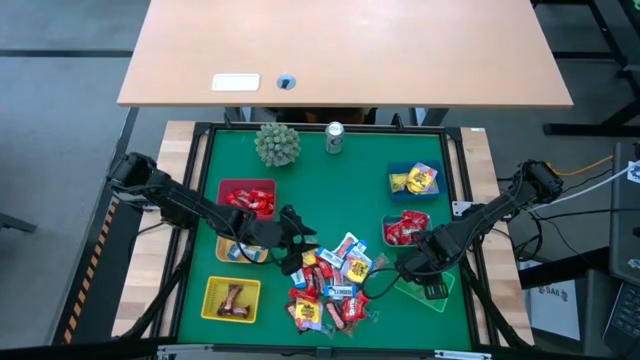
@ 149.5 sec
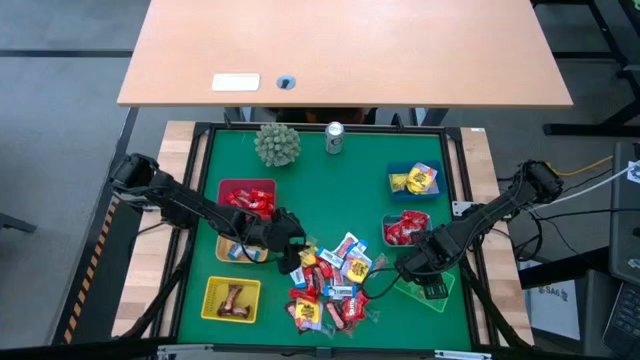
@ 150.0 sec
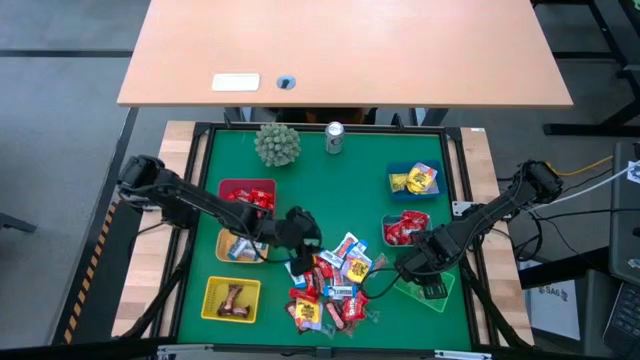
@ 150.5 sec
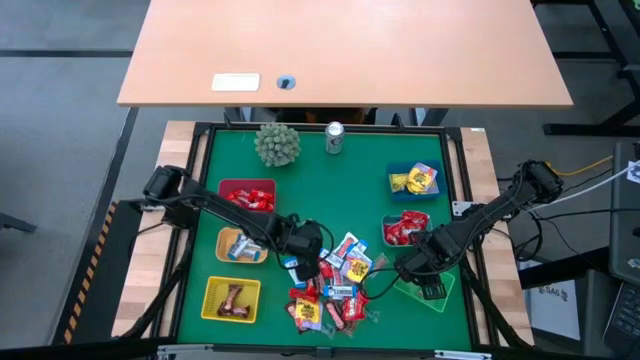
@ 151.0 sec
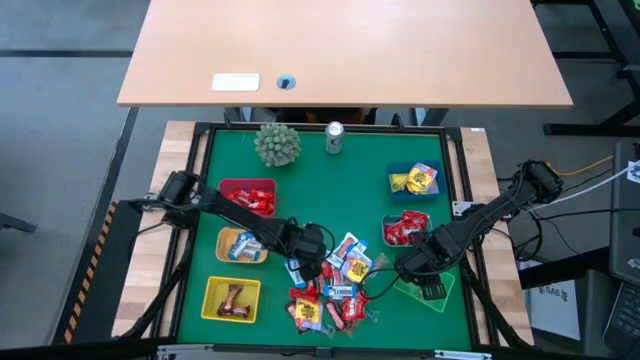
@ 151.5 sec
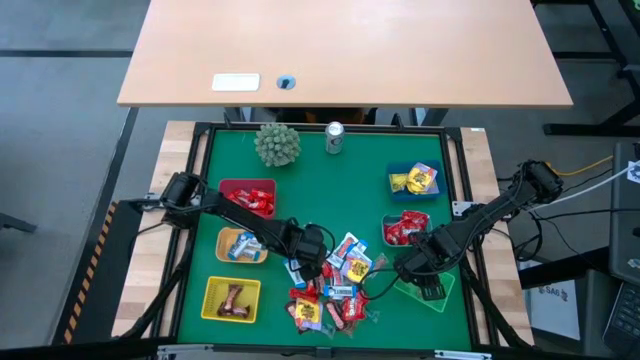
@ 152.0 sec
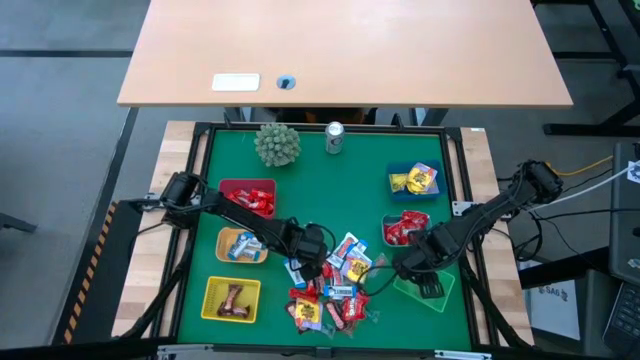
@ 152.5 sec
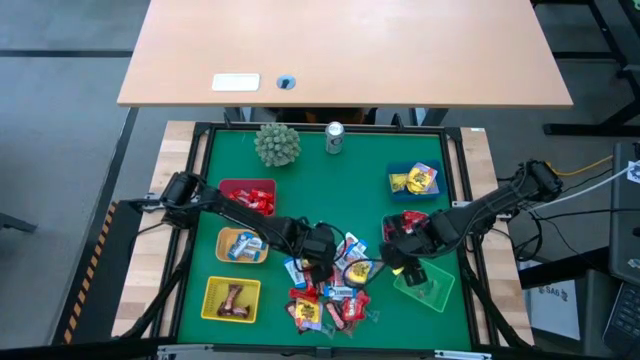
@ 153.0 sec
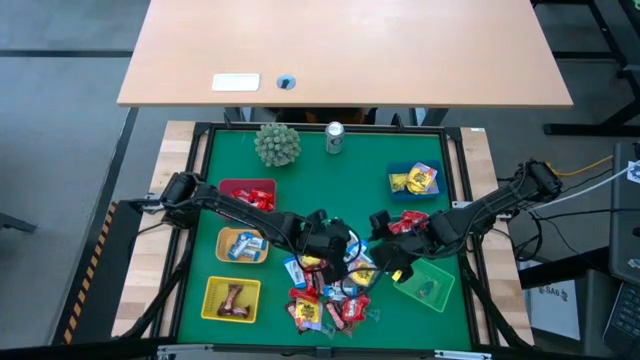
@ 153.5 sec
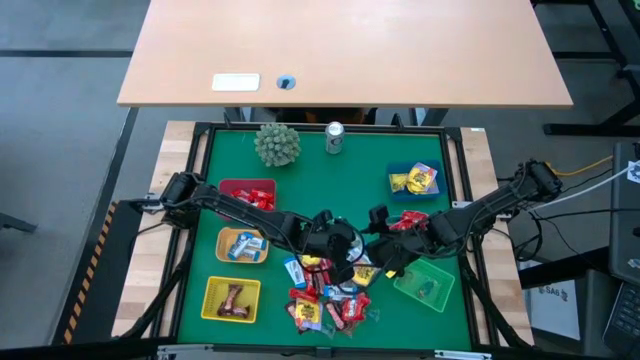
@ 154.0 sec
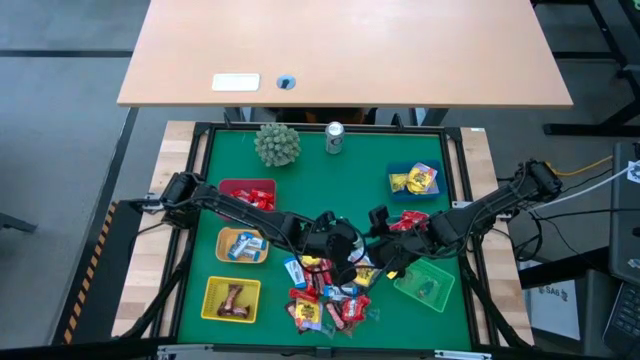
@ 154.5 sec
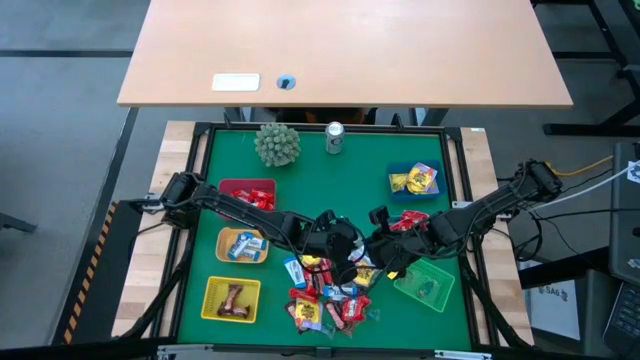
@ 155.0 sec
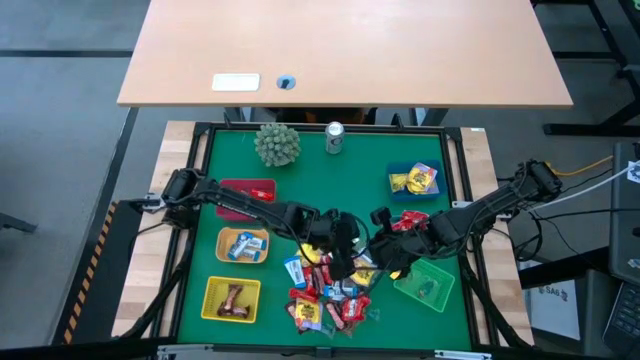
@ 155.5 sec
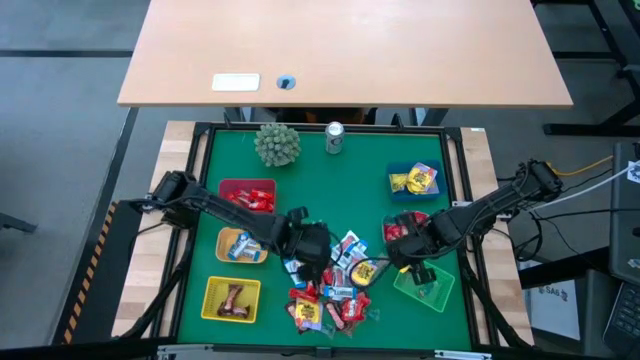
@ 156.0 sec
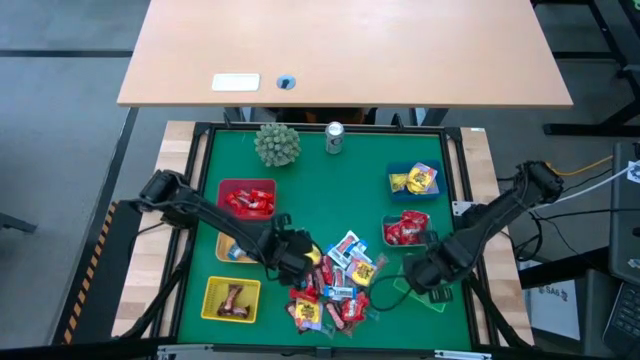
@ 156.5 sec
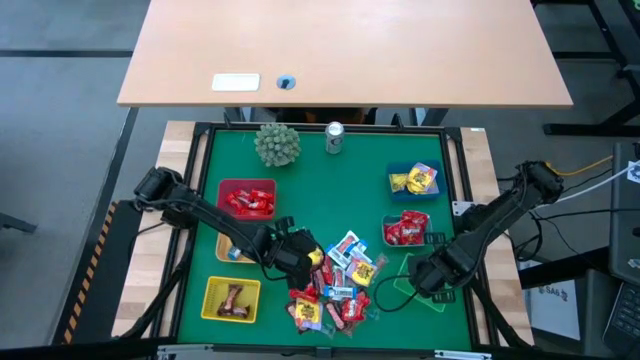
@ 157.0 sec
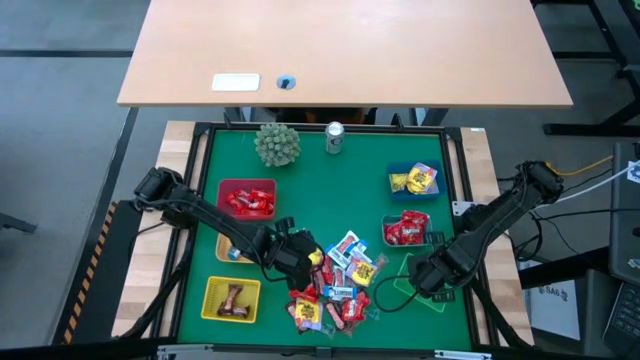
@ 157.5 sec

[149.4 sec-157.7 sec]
Task: Sort candy
Put the green gummy into the green bin

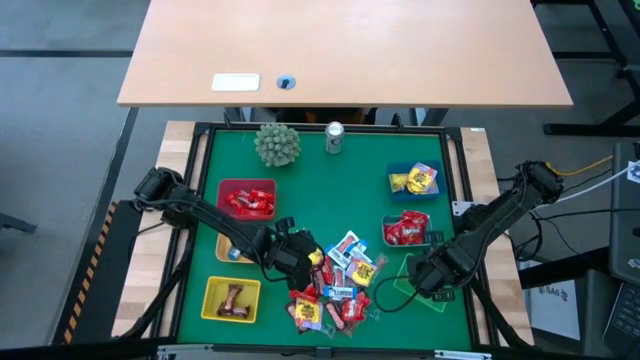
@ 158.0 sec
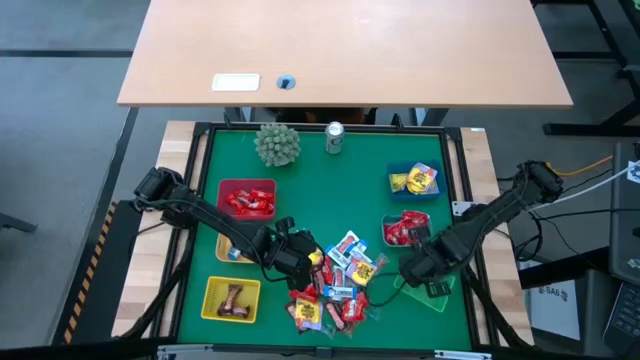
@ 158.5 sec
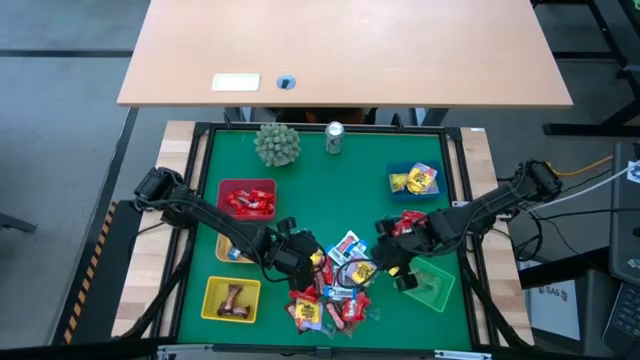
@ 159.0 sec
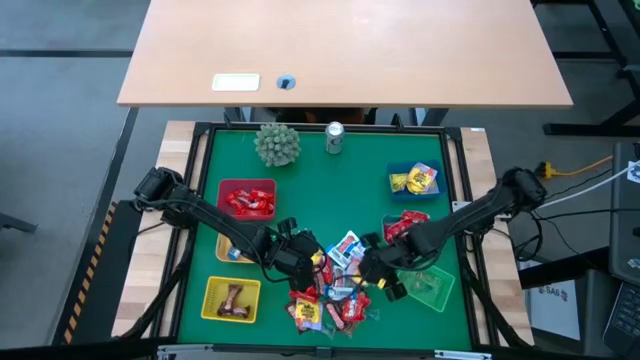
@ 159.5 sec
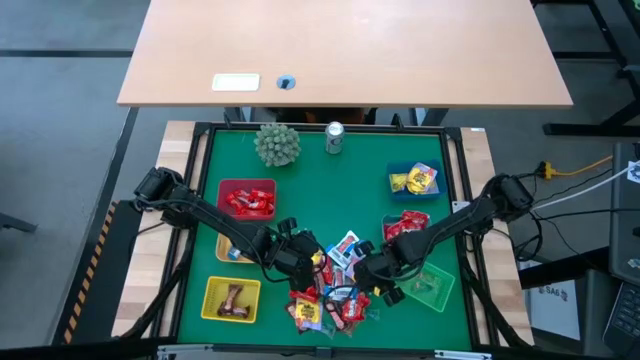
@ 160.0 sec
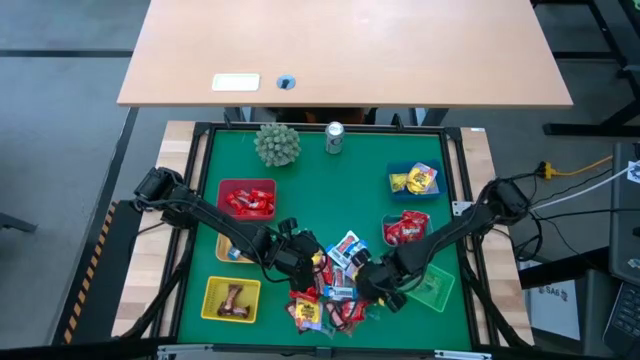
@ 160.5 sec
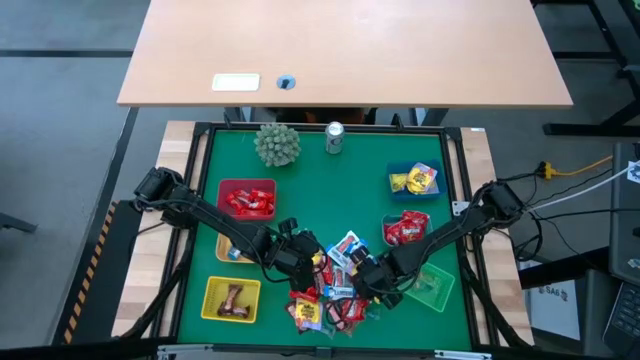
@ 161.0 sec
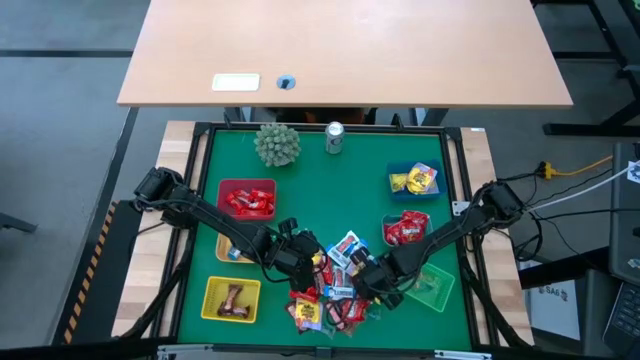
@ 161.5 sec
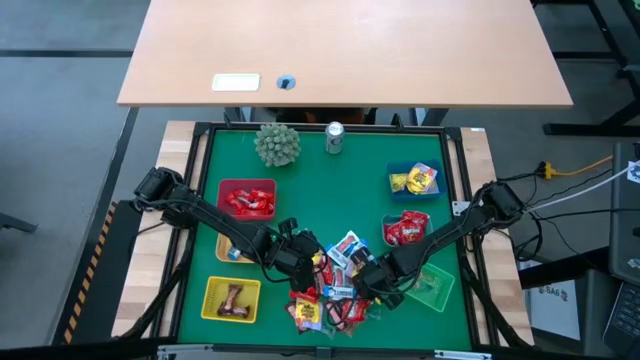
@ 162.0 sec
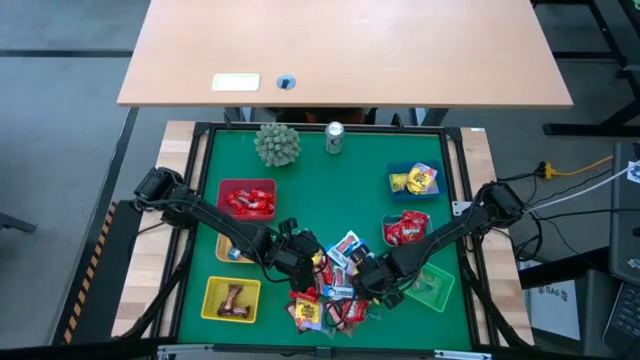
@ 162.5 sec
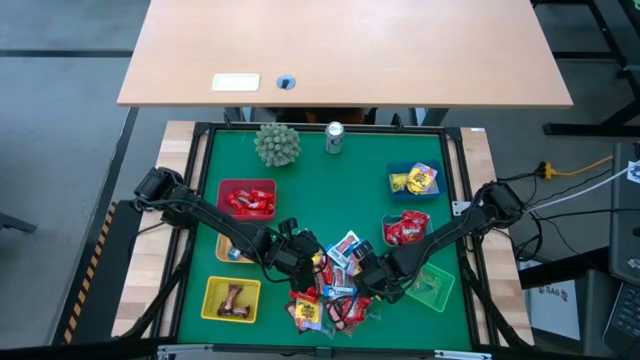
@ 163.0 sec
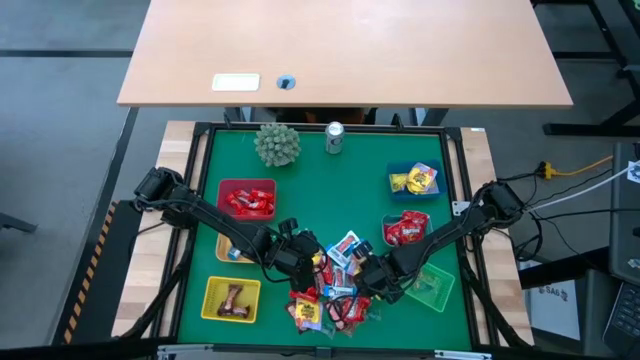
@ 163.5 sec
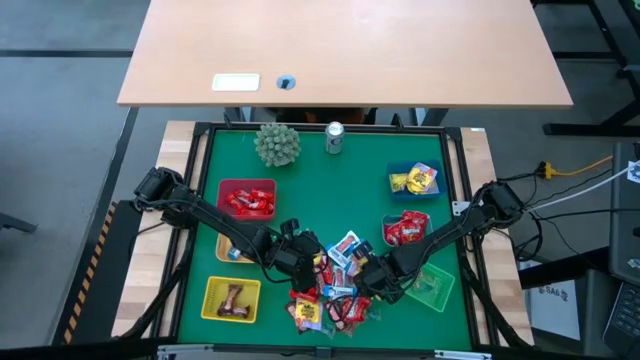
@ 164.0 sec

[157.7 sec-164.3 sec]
Put the yellow candy into the dark blue bin

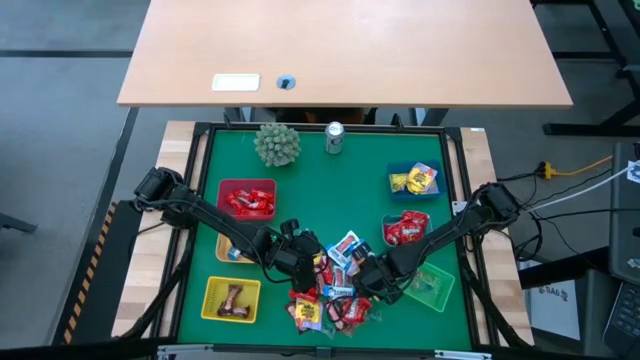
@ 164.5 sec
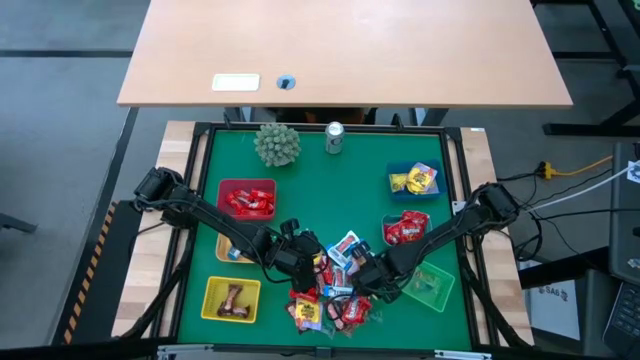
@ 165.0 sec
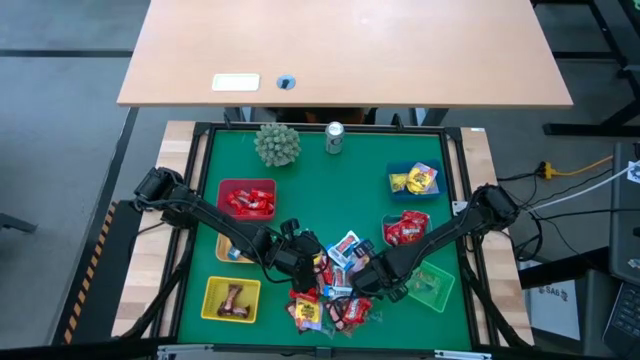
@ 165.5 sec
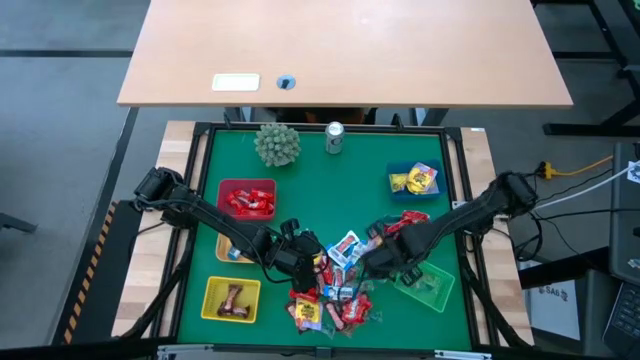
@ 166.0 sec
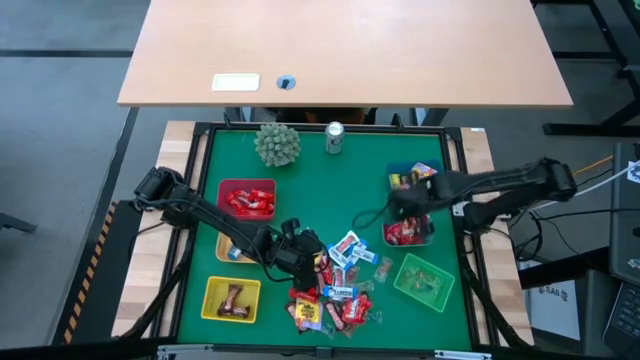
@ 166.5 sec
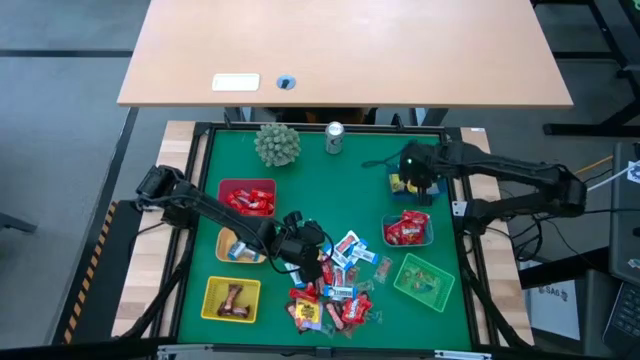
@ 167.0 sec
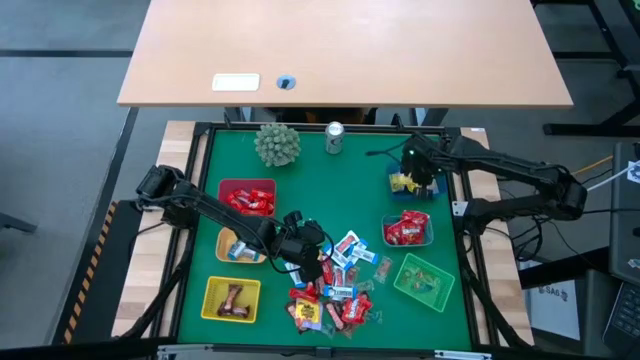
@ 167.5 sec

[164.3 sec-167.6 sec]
Put the yellow candy into the dark blue bin

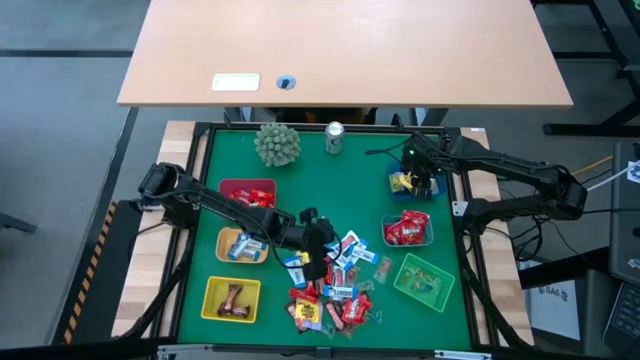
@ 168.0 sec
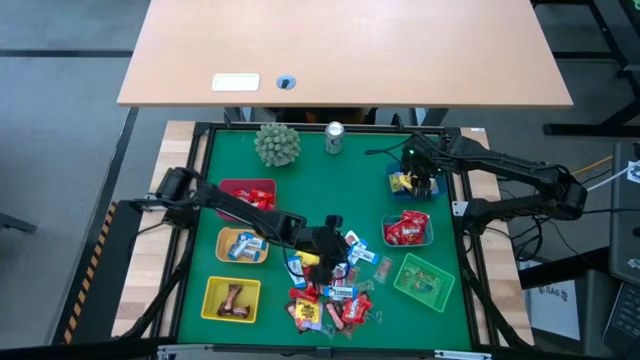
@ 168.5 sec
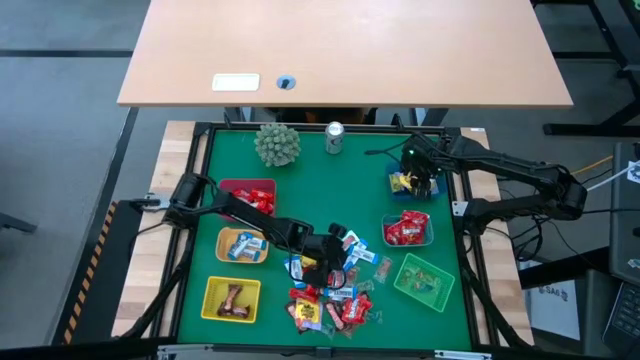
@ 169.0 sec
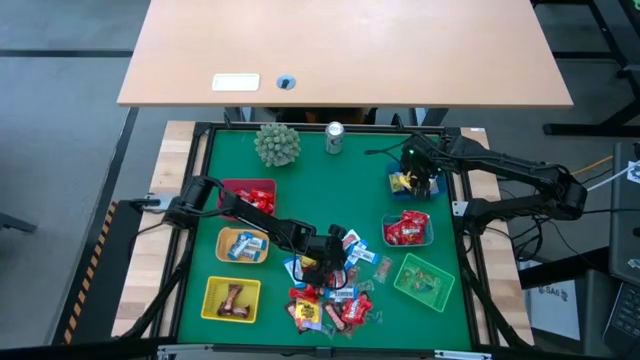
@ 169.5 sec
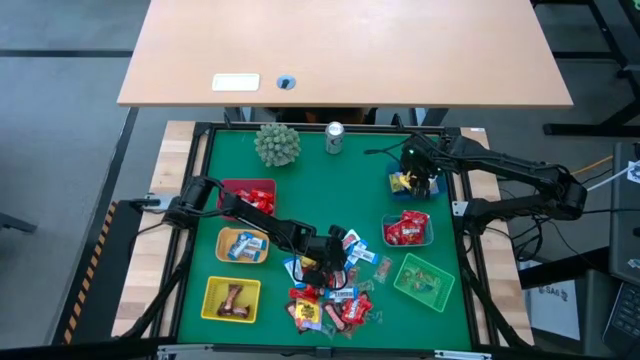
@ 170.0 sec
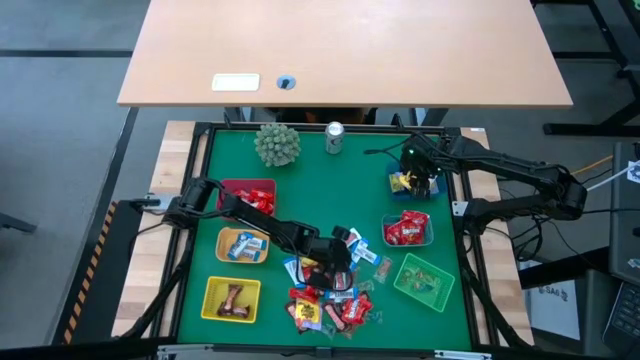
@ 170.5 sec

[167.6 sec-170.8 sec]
Put the white chocolate bar into the orange bin
